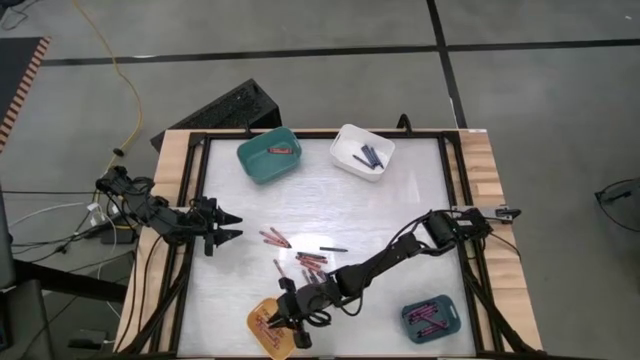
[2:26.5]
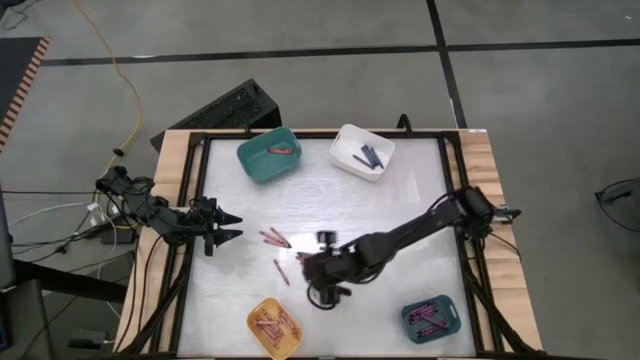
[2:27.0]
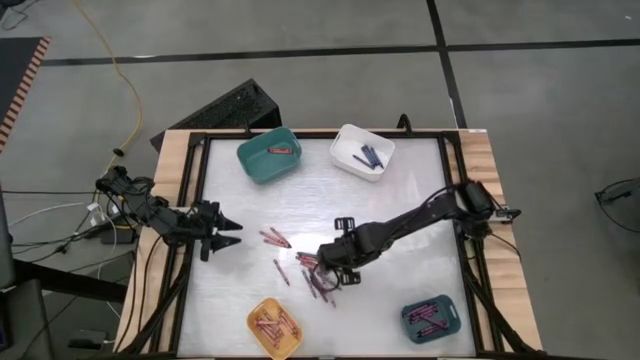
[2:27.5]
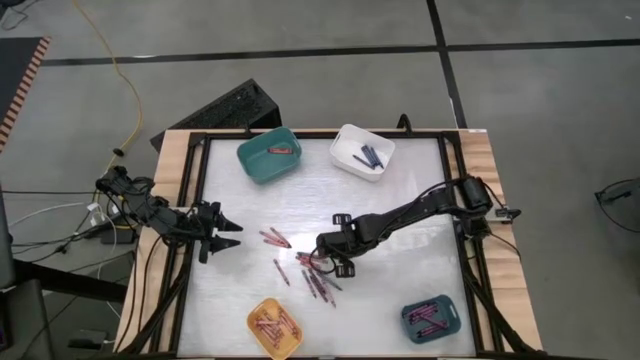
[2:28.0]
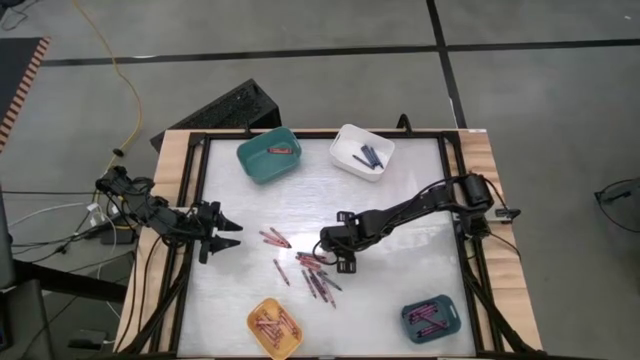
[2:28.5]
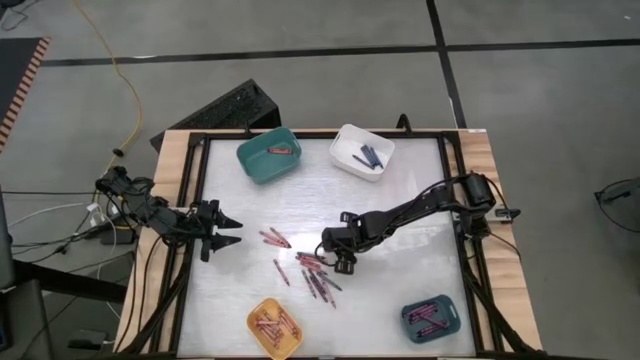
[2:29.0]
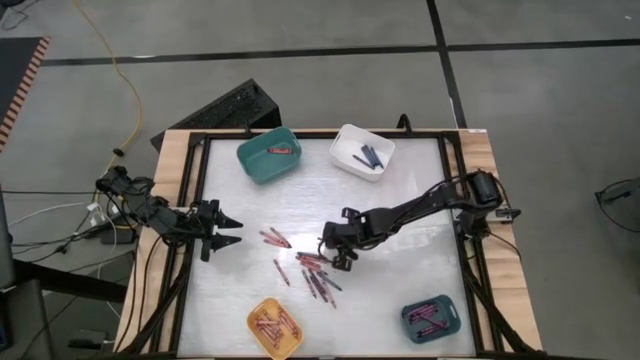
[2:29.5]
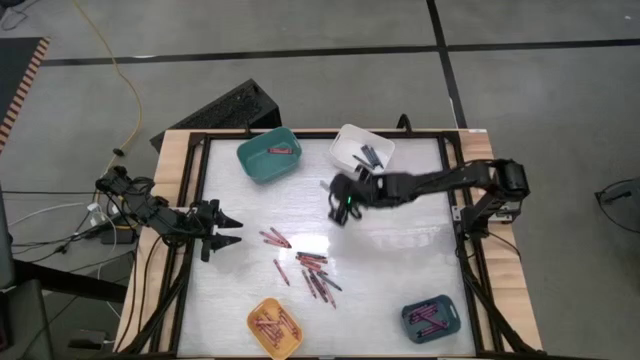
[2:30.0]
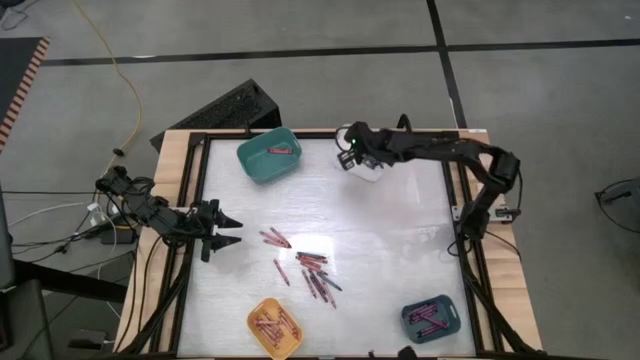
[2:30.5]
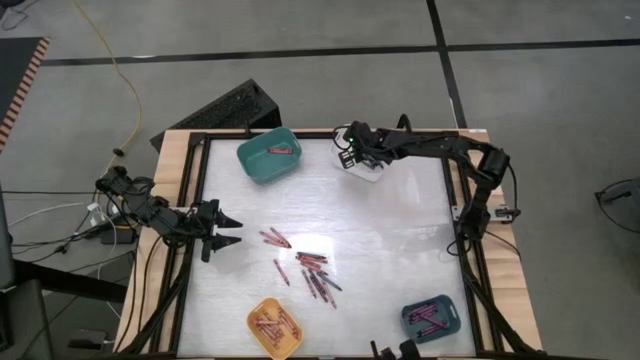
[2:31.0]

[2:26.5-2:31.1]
Task: Sort crayons
Put the blue crayon into the white bin

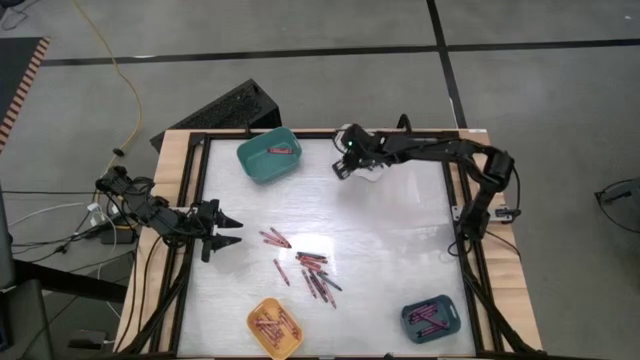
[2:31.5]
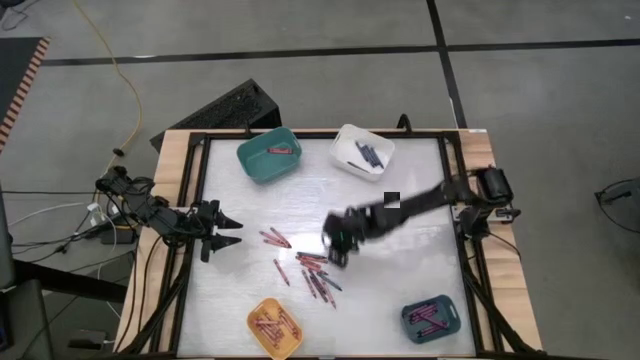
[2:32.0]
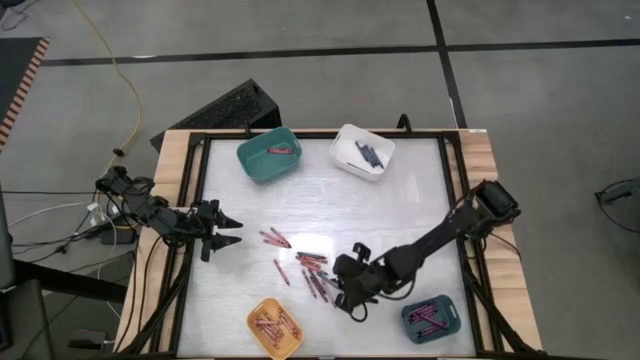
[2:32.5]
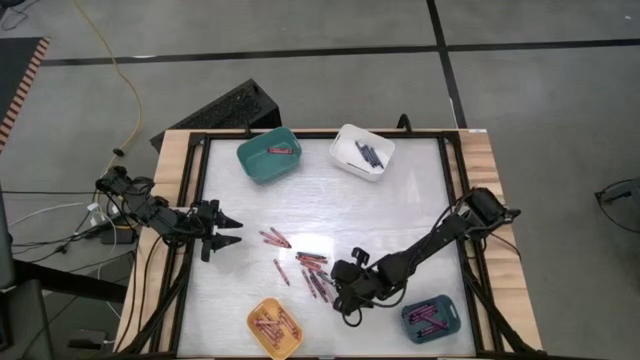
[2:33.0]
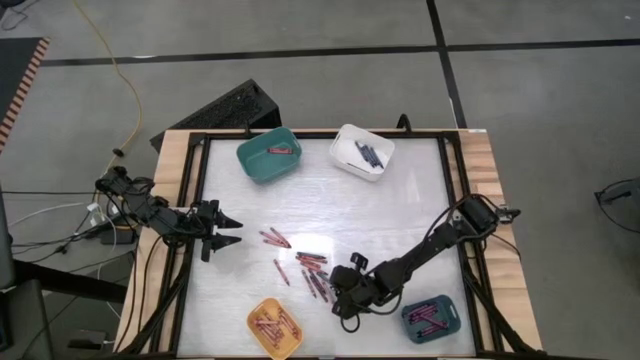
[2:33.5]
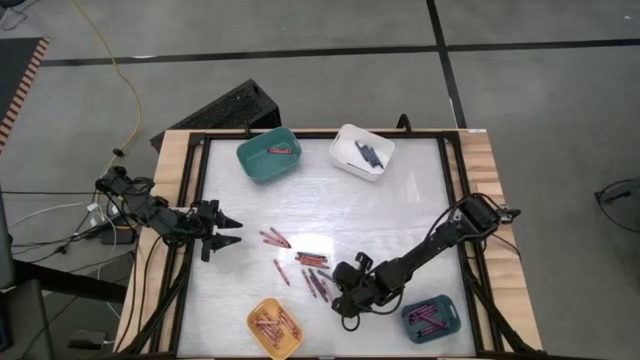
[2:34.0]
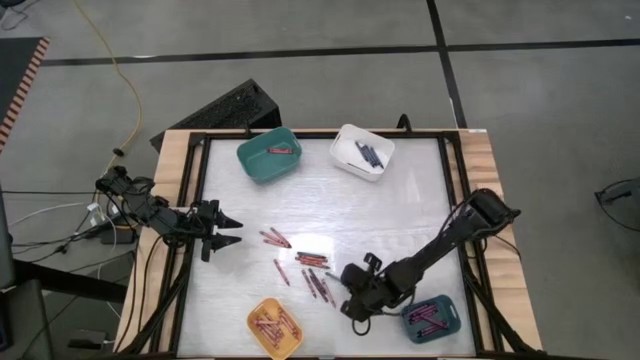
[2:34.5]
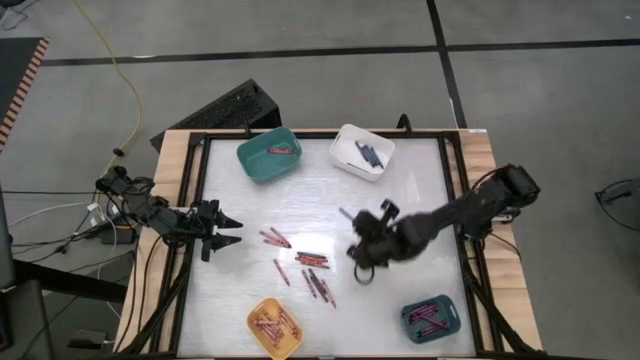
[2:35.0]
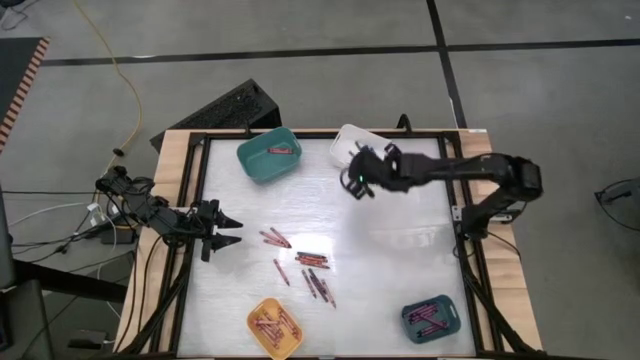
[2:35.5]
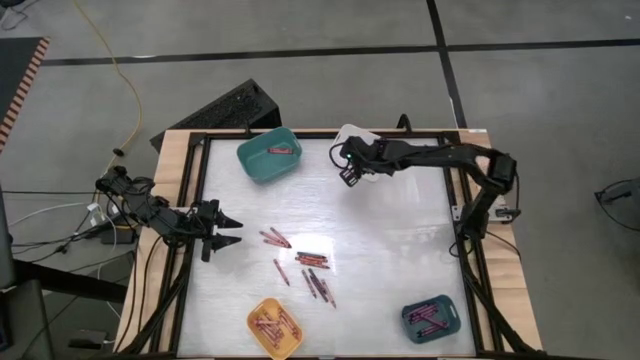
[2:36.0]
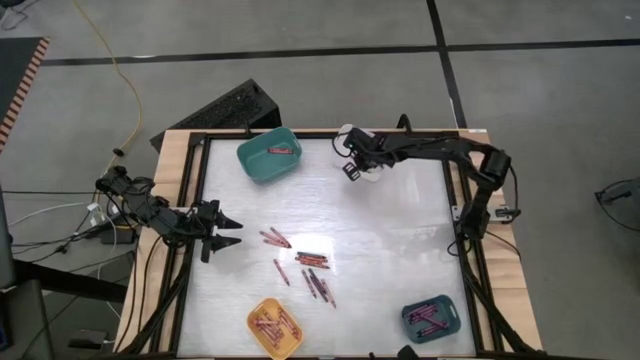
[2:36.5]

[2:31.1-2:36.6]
Put the blue crayon into the white bin

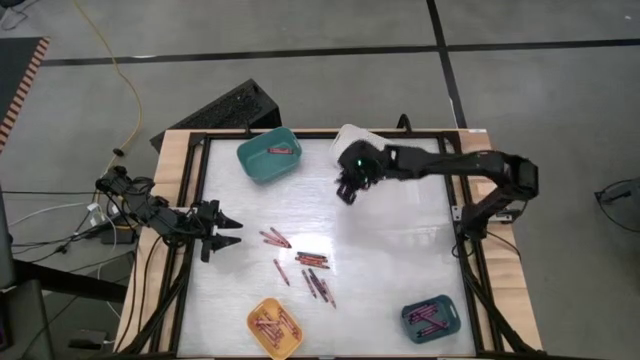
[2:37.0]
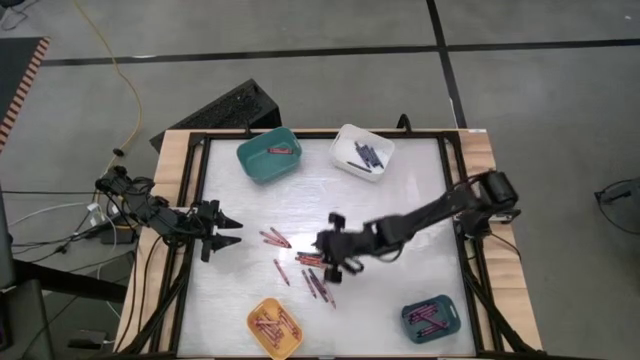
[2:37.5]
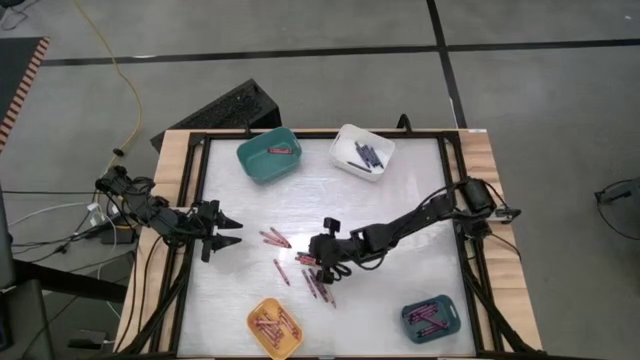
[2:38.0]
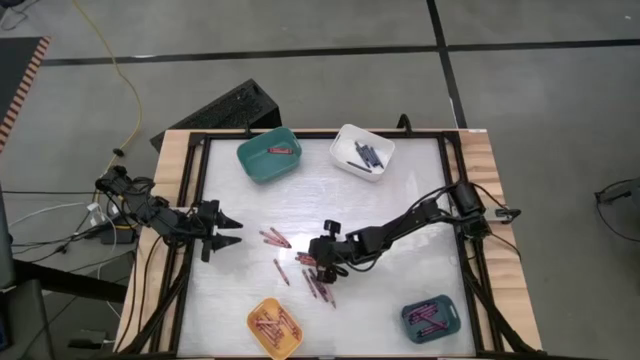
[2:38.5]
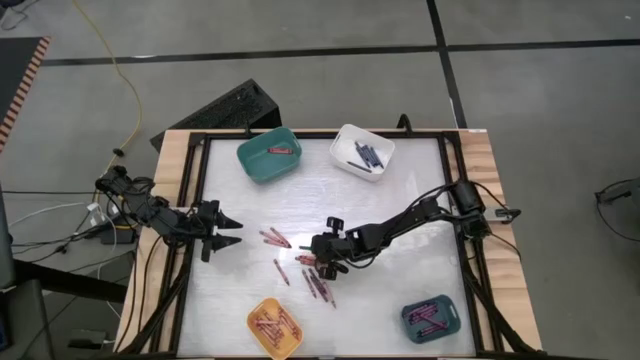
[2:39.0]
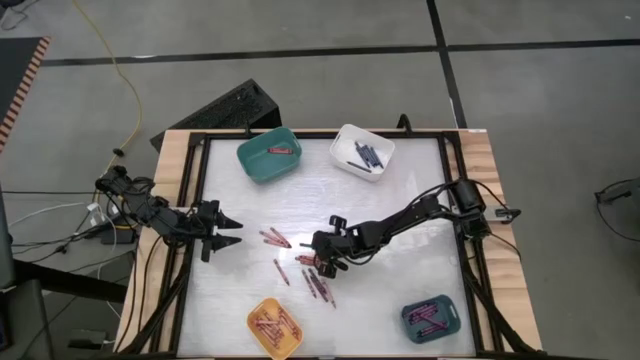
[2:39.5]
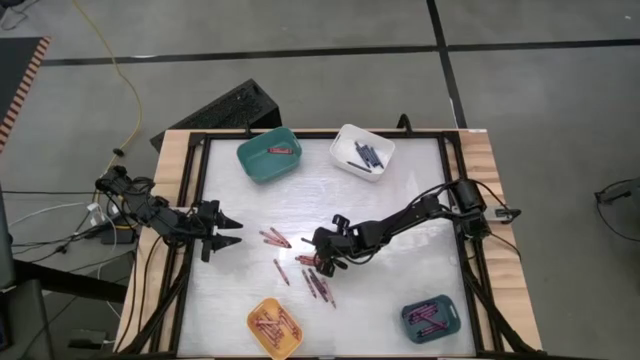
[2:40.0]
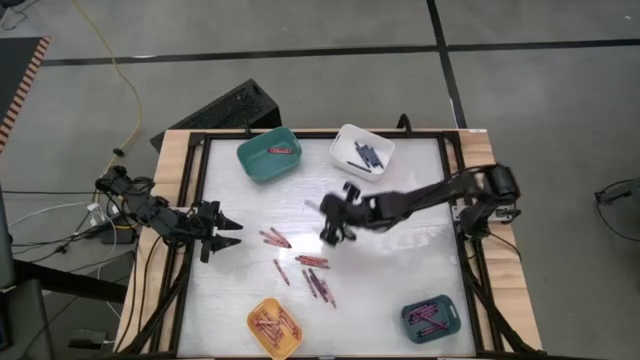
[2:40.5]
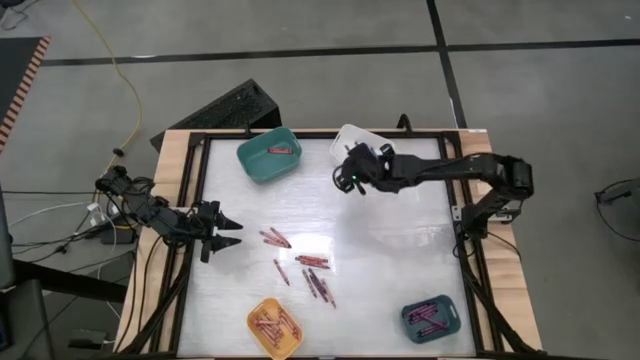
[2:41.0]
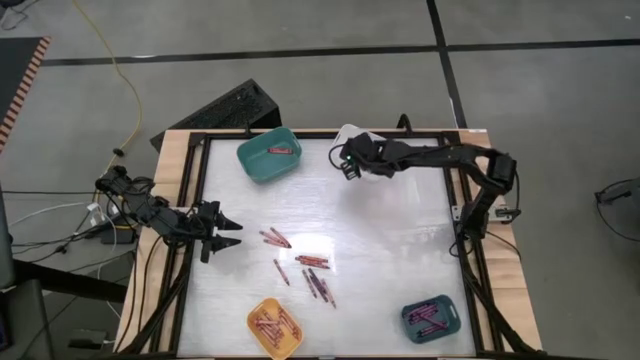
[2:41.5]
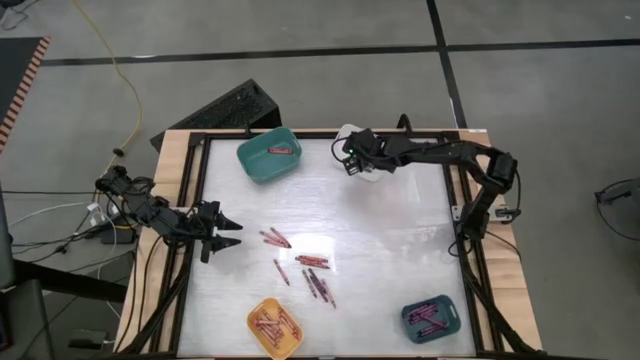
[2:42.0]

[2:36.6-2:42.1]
Put the blue crayon into the white bin

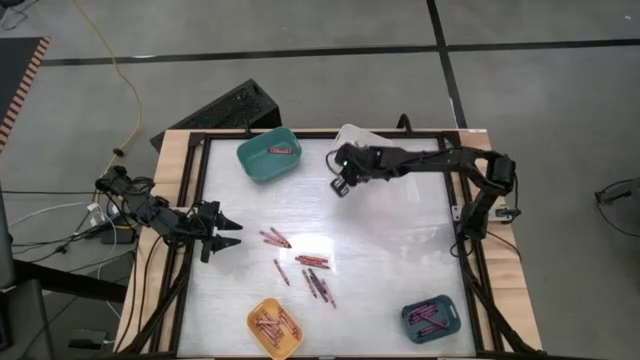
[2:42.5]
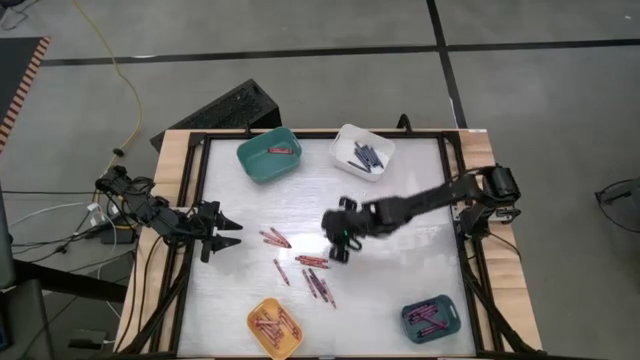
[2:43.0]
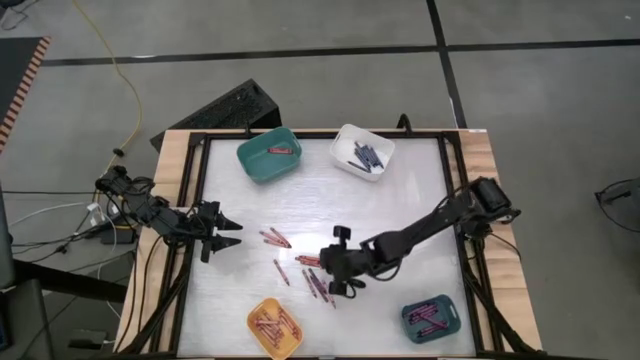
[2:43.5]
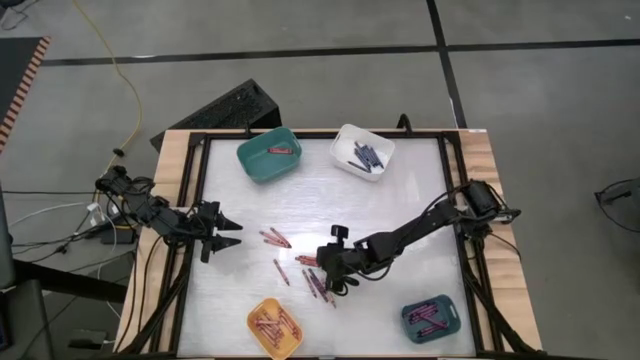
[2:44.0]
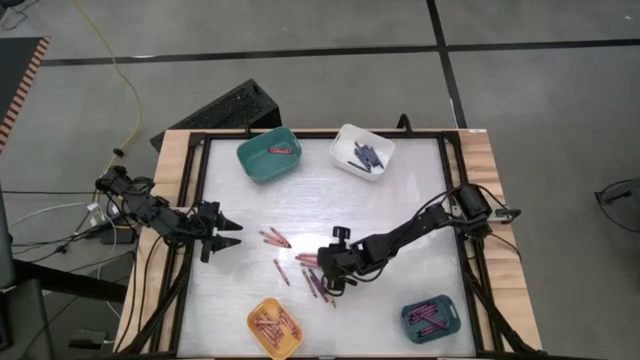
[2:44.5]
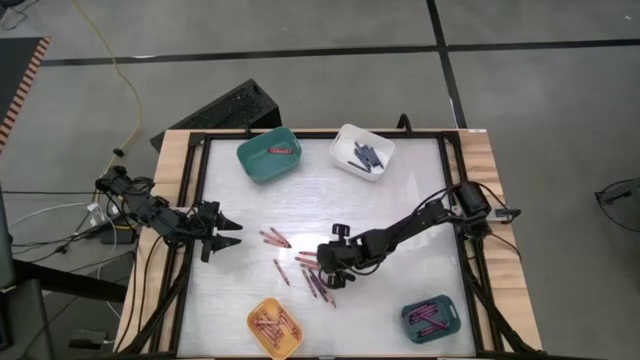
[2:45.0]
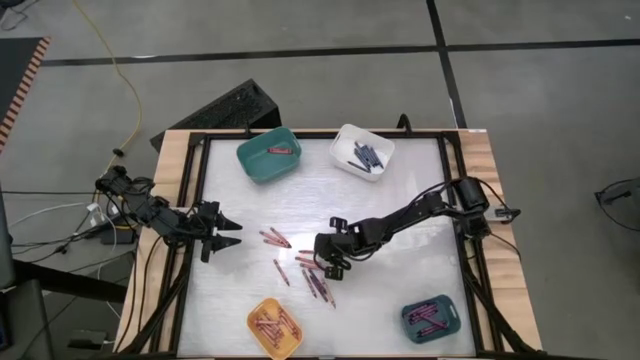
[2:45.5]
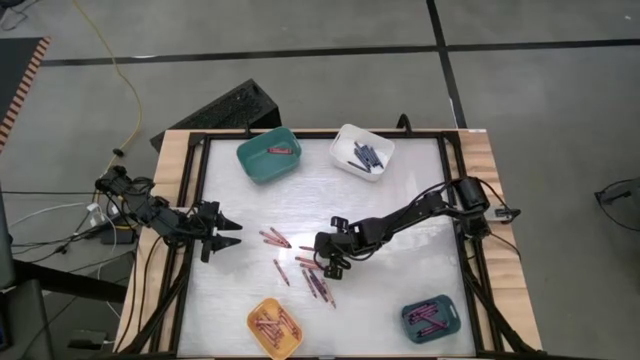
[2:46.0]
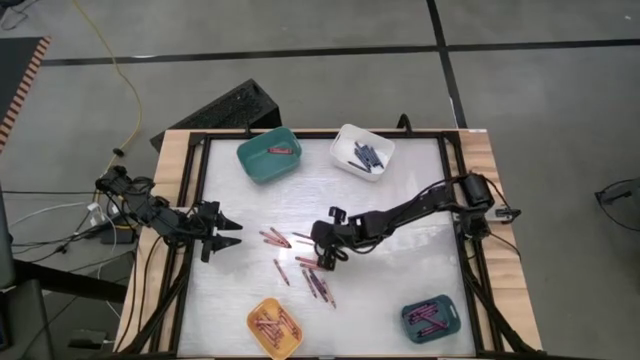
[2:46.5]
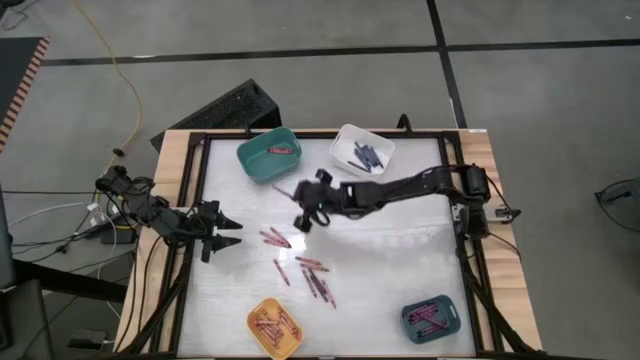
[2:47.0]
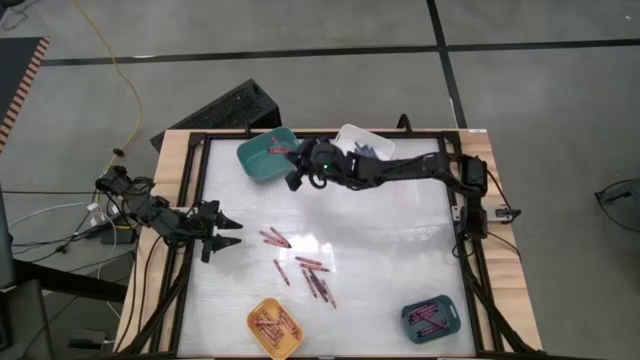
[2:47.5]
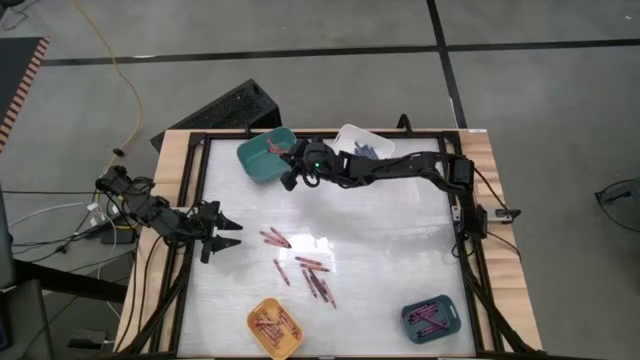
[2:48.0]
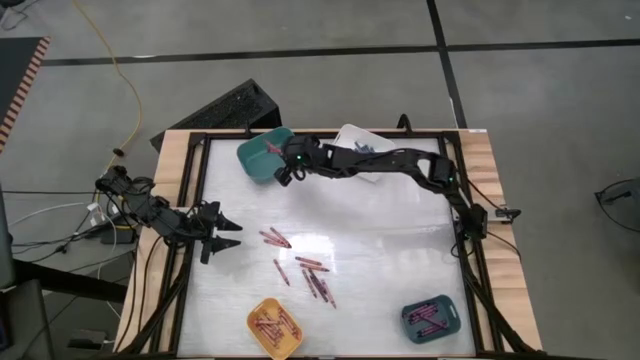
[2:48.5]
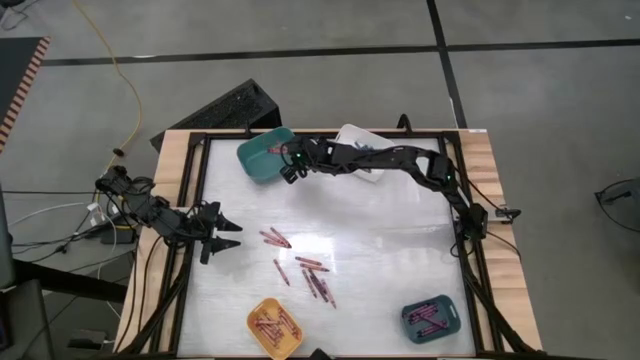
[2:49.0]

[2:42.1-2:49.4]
Put the red crayon into the top green bin
